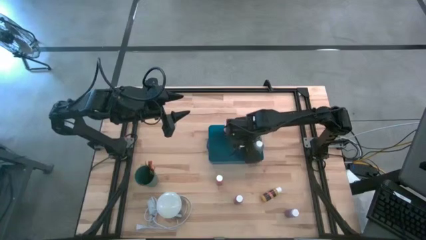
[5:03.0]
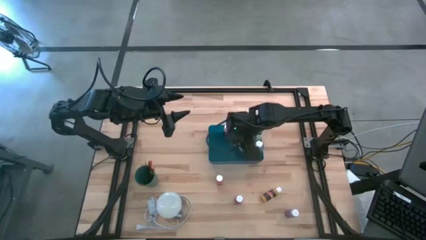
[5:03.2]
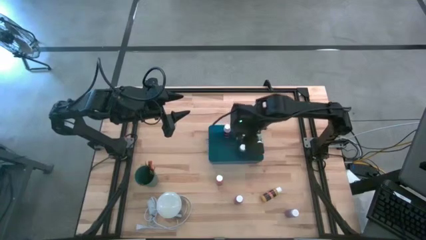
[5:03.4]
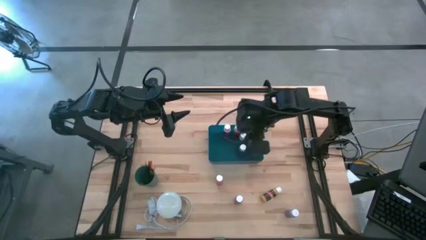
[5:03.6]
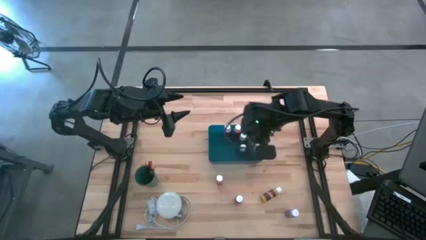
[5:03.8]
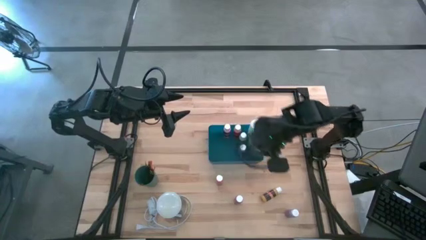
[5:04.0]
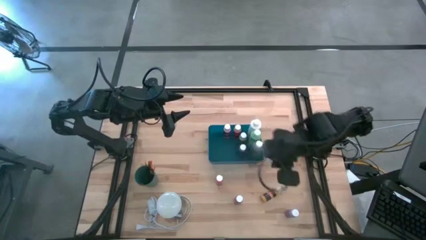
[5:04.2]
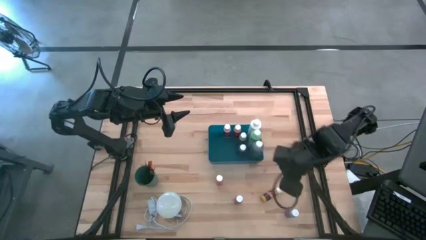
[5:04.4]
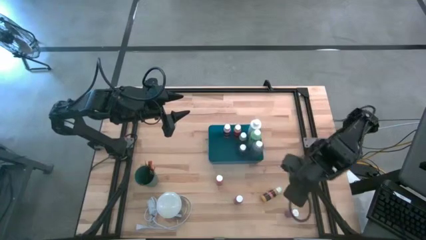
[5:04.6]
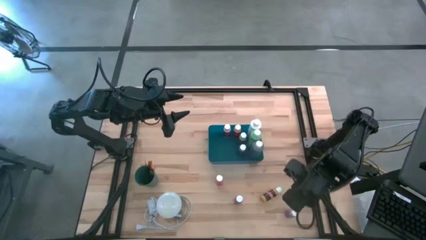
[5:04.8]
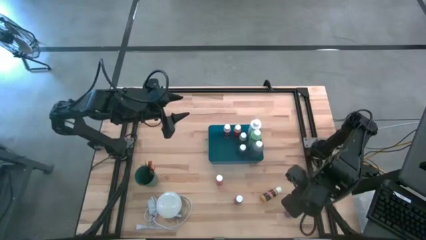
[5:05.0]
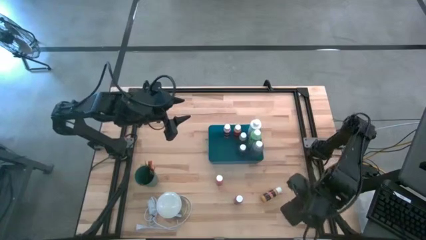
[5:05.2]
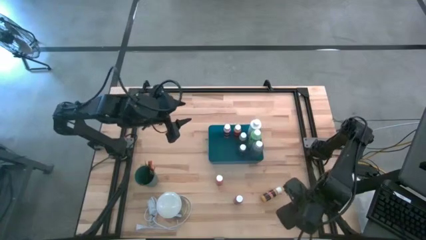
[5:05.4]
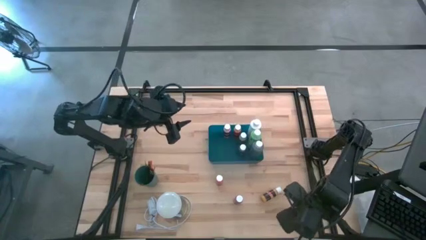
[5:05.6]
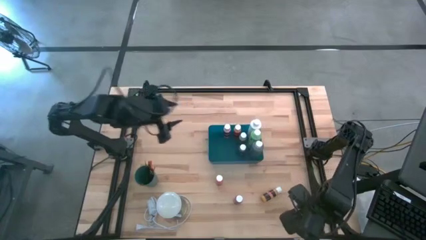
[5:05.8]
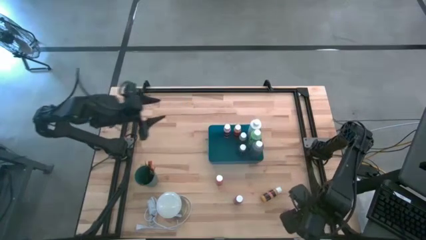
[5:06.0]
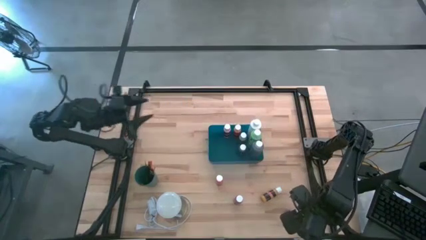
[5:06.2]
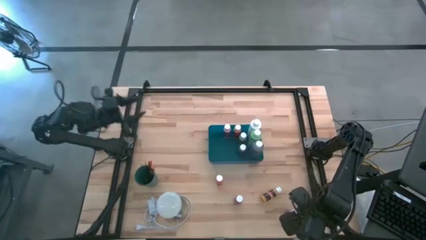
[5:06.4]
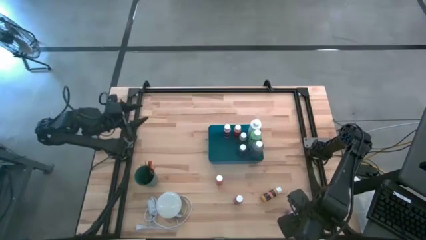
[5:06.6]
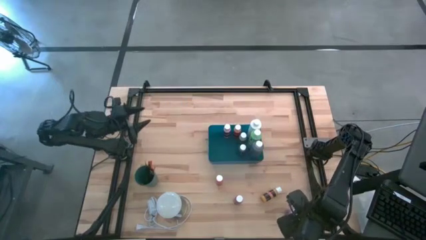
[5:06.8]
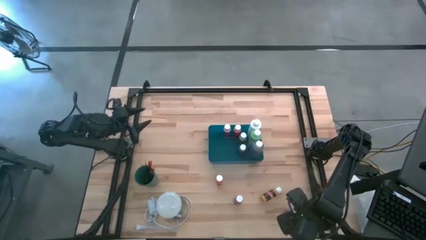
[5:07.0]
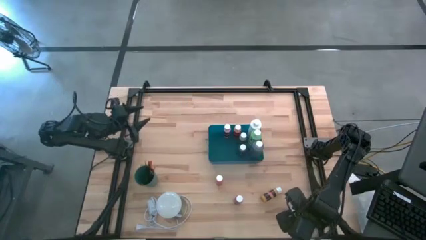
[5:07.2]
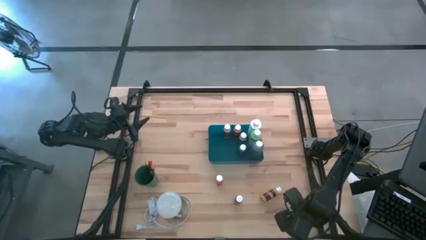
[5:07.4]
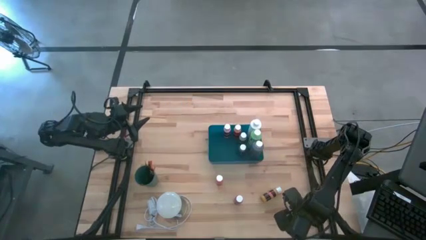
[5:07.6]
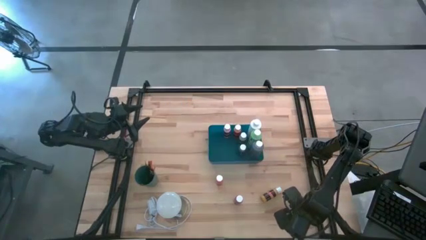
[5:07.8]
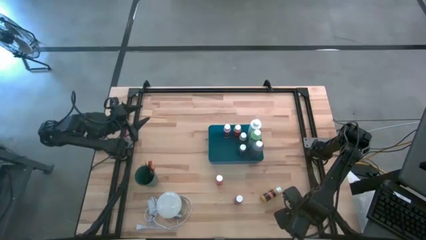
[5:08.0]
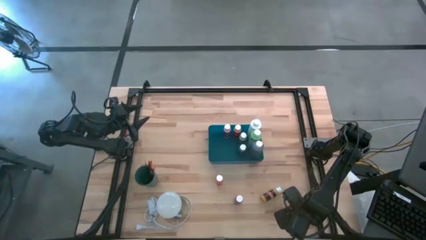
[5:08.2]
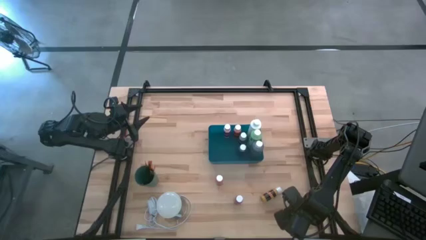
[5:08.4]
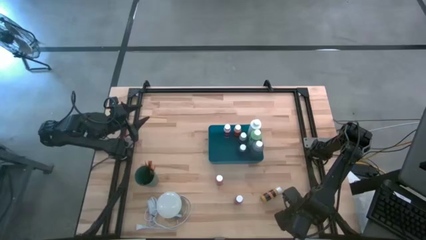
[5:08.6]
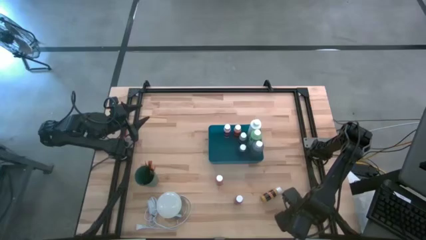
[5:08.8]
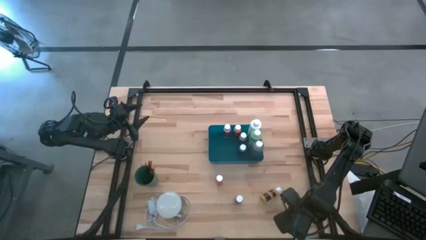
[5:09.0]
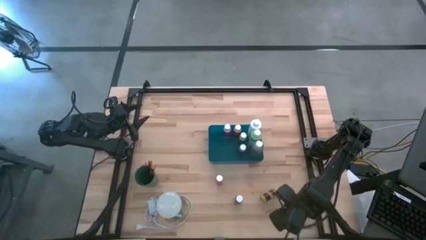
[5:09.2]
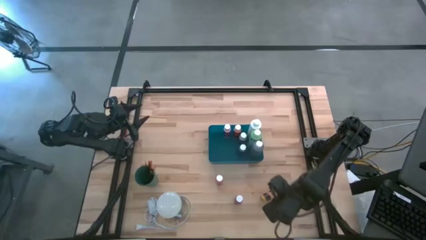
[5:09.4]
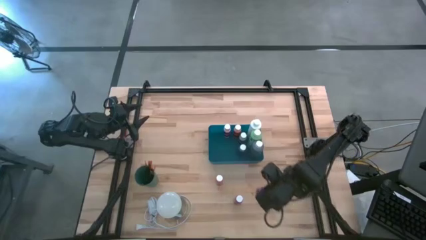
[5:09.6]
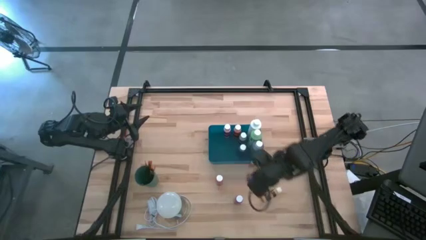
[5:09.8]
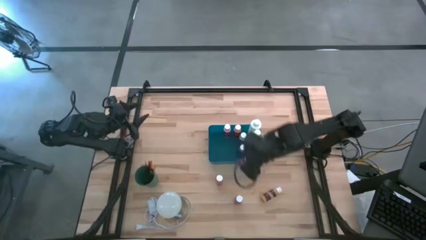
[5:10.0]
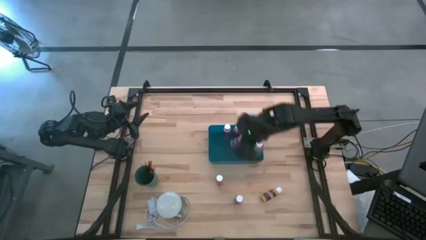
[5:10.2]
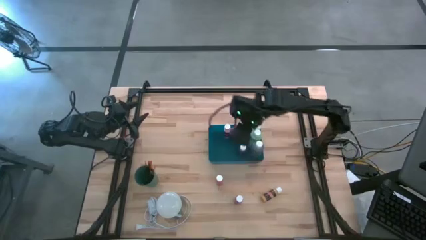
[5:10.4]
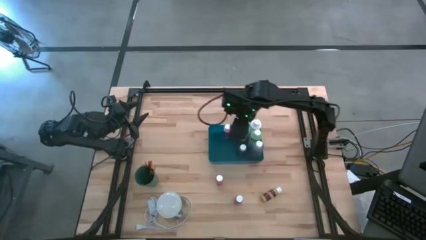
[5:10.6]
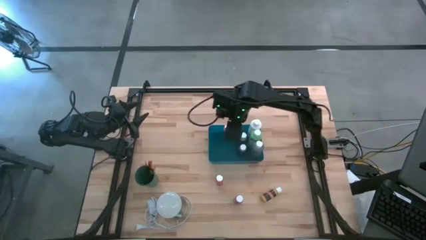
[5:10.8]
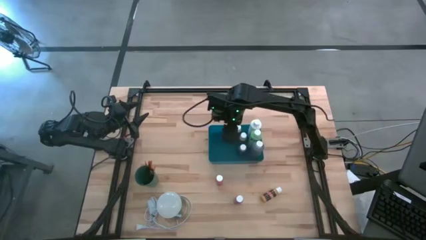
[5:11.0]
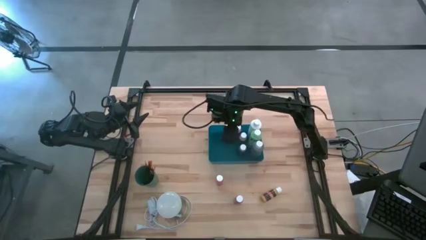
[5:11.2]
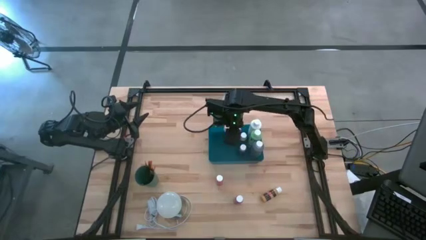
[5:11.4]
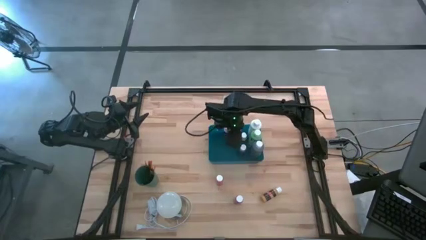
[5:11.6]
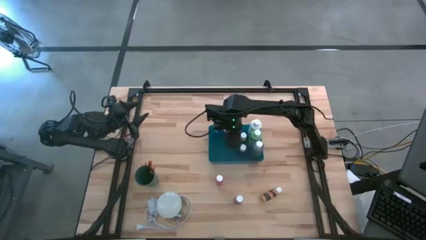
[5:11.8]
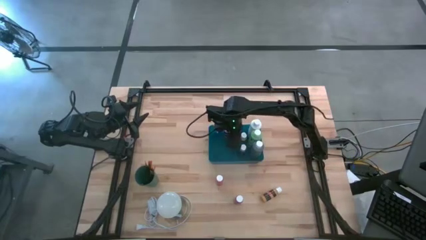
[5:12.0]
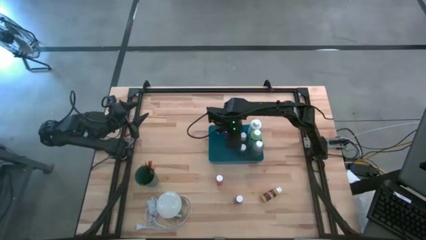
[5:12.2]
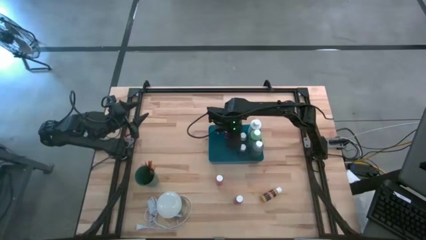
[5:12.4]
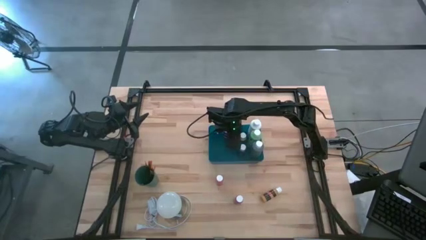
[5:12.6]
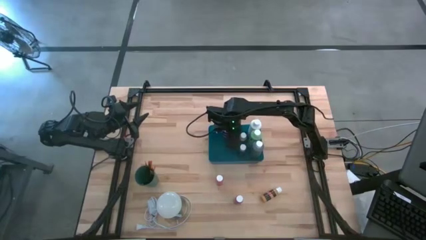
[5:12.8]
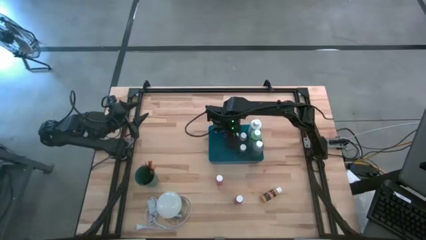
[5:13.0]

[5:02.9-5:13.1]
Task: Pick & Place Paint Supplies
Put the light purple paint bottle into the blue bin

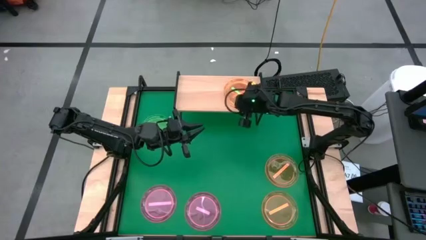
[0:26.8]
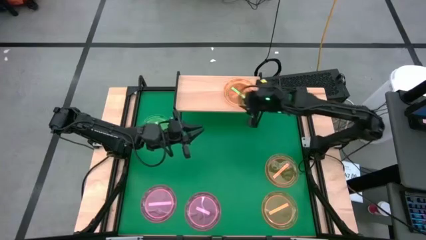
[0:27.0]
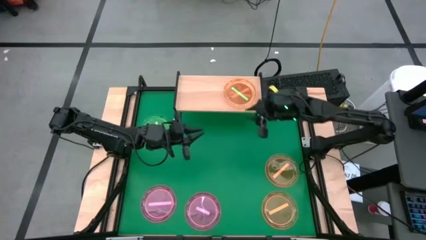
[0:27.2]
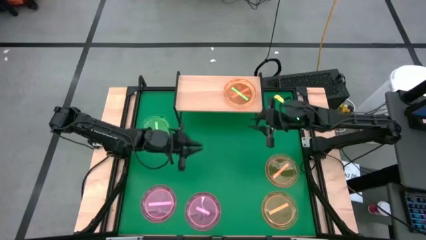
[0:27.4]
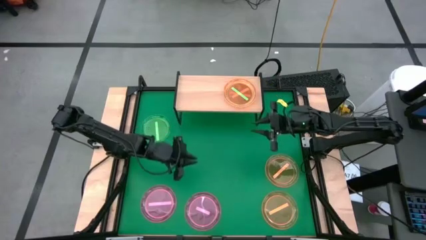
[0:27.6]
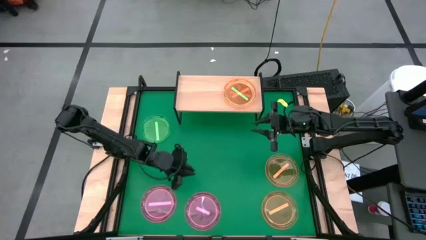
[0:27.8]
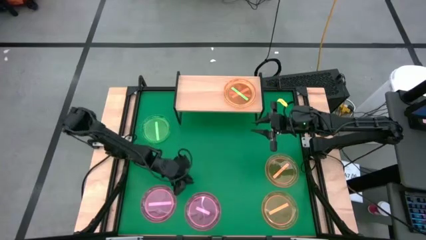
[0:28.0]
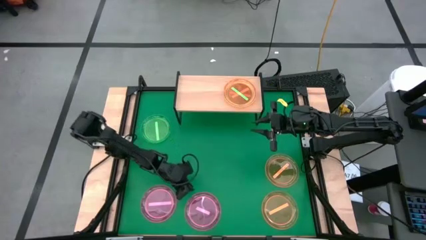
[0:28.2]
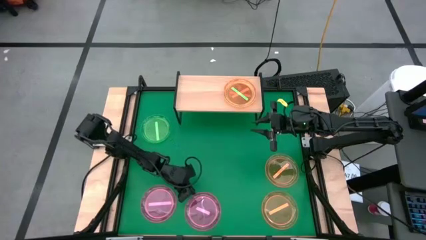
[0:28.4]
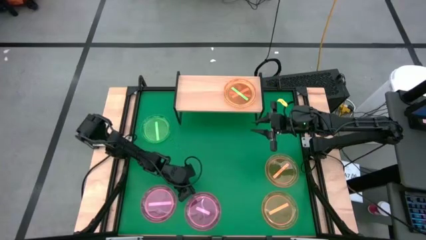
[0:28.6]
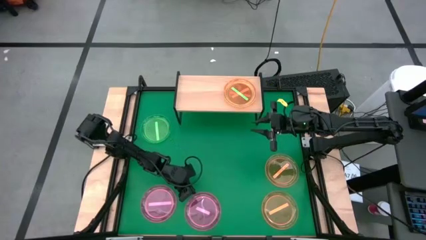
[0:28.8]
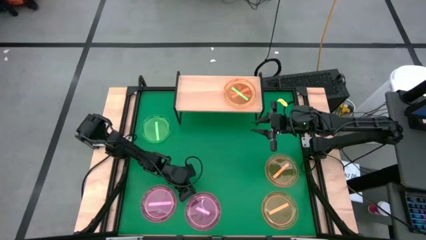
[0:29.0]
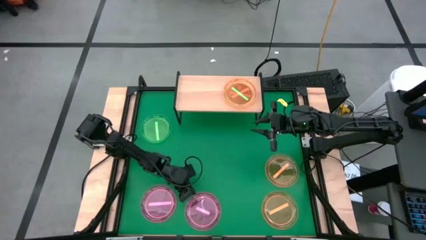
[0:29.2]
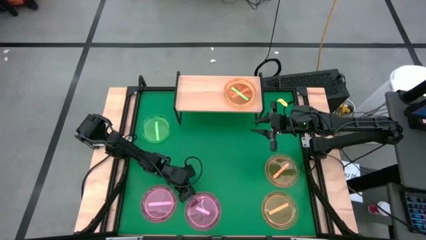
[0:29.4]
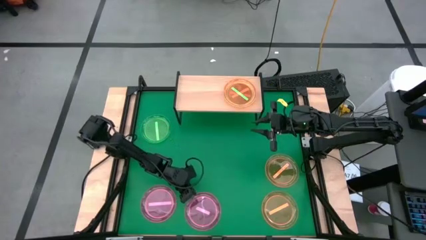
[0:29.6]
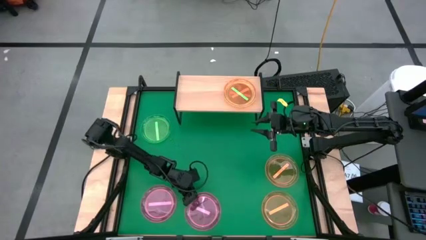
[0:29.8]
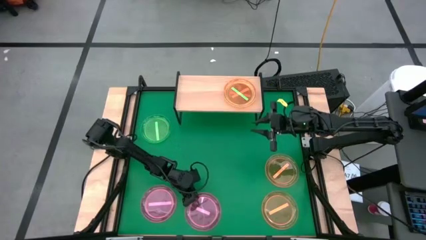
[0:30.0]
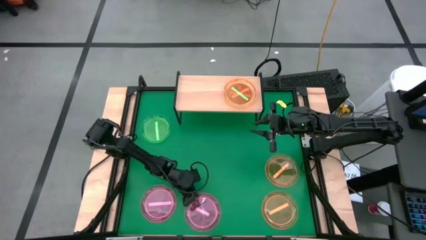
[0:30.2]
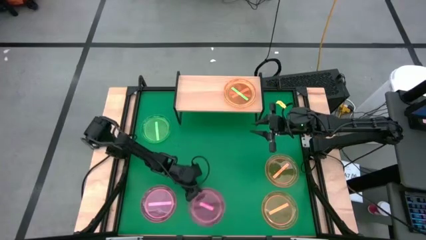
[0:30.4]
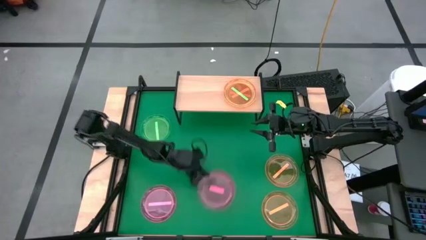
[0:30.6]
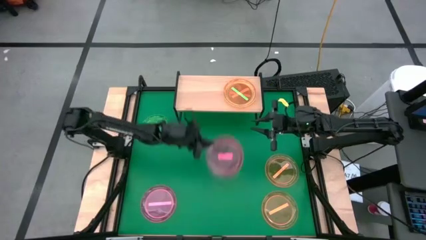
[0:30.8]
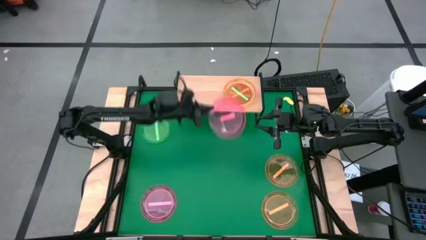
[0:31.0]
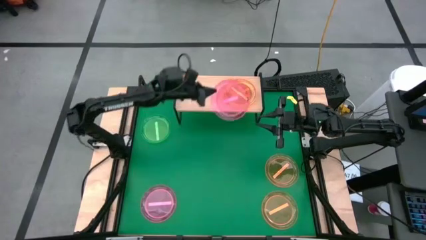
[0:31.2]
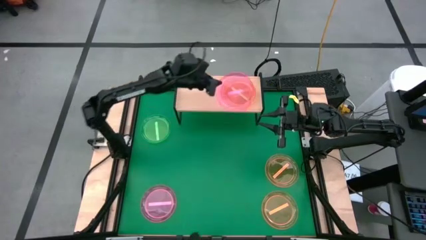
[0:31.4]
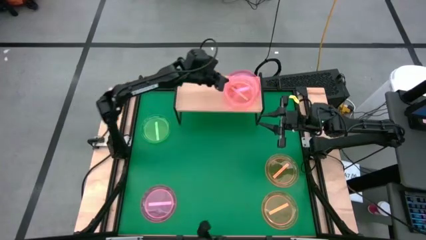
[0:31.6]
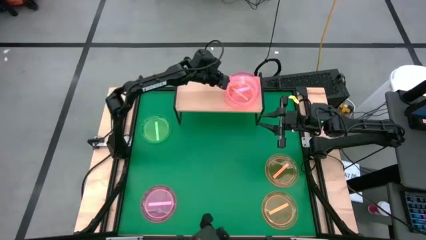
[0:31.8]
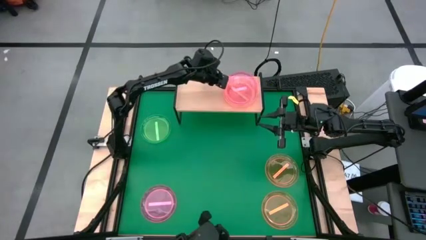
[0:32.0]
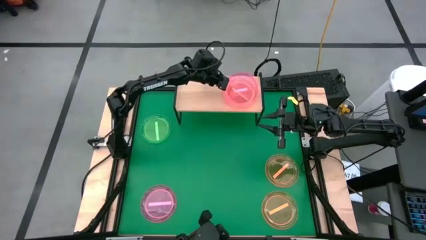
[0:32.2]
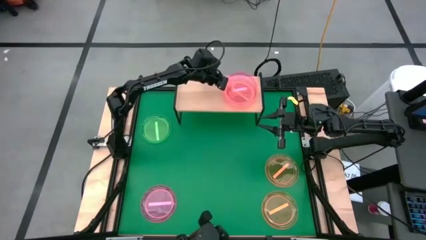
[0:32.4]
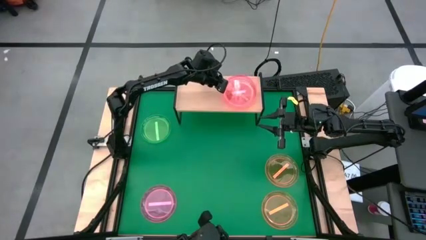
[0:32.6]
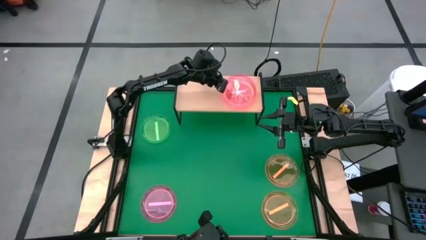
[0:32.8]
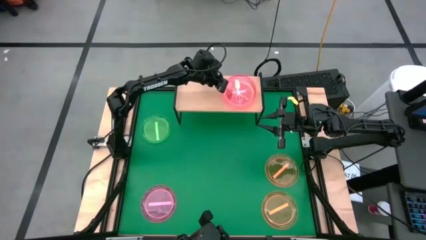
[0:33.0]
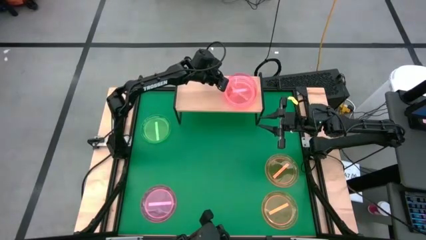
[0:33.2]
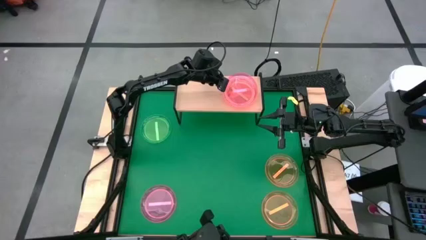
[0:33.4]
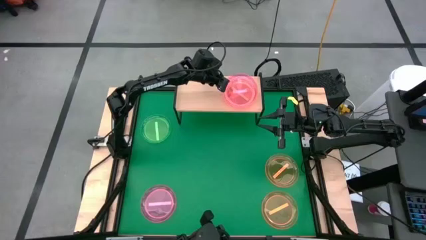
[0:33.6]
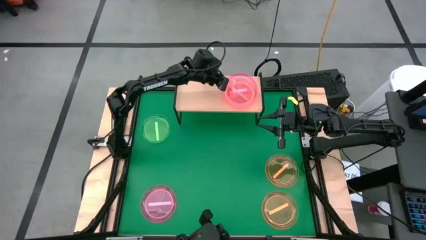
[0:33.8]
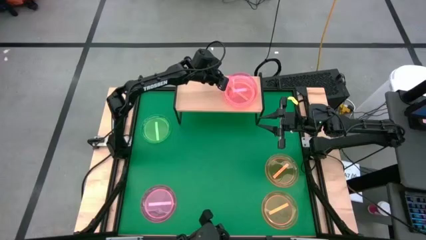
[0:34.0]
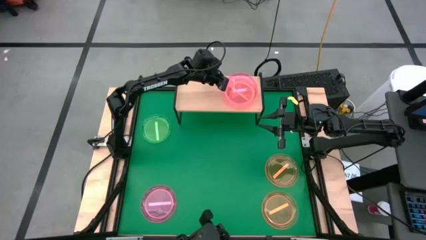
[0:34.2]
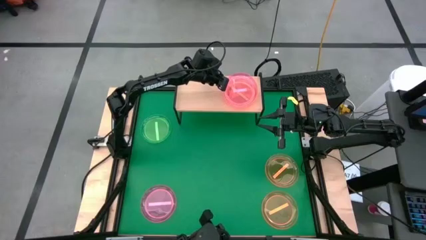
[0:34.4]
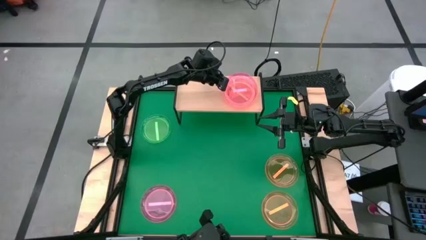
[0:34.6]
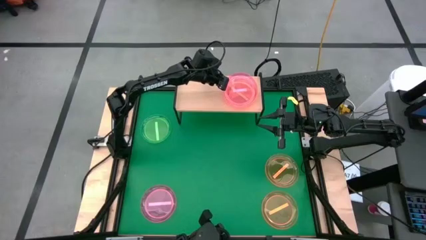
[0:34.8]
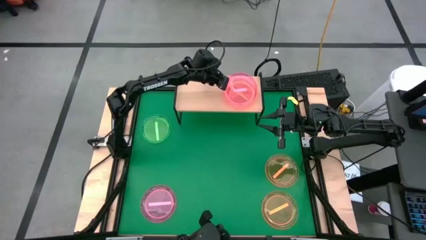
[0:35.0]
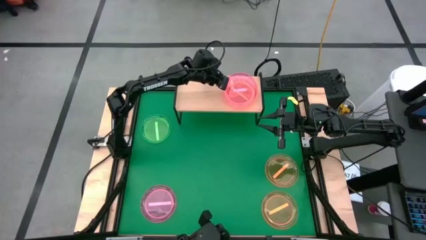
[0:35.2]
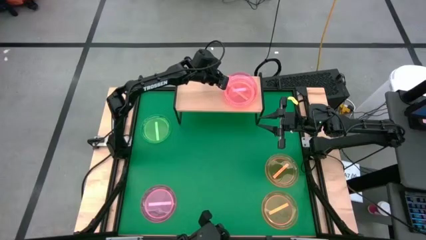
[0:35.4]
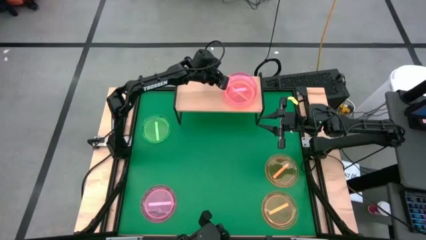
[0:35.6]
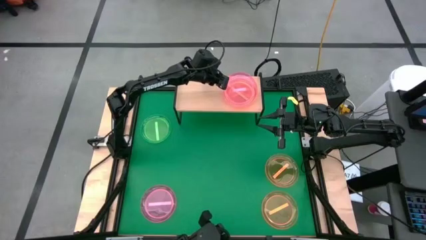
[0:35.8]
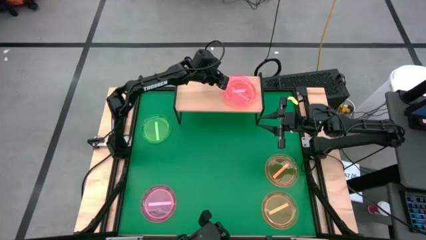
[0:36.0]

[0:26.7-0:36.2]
Task: Place and stack plates onto a shelf
Stack the pink plate on top of the green plates on the shelf
